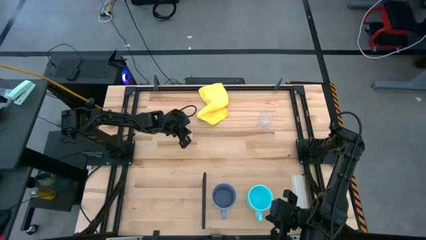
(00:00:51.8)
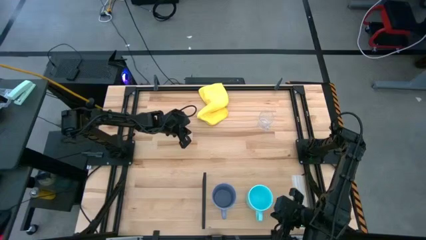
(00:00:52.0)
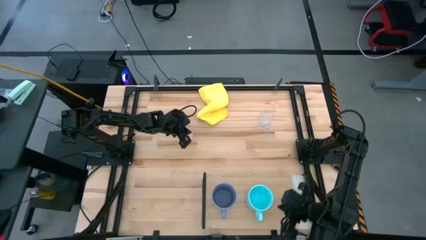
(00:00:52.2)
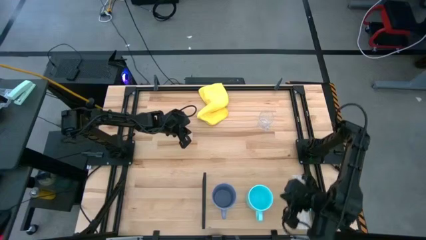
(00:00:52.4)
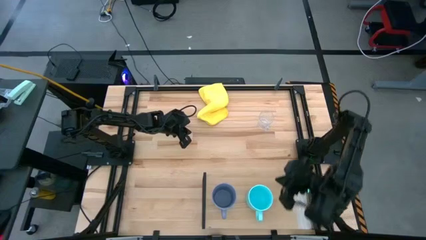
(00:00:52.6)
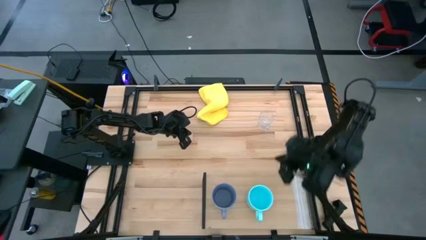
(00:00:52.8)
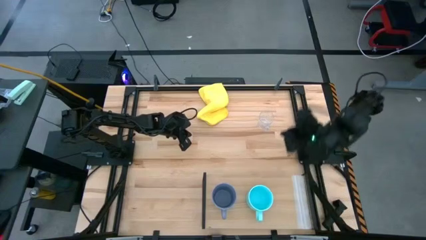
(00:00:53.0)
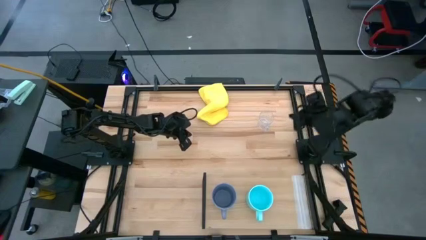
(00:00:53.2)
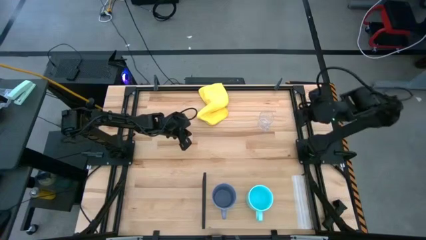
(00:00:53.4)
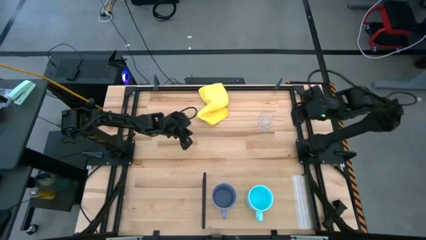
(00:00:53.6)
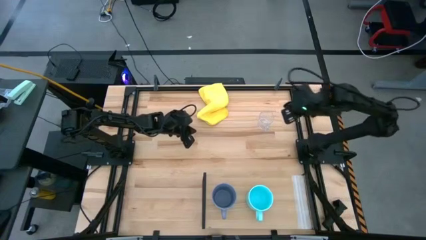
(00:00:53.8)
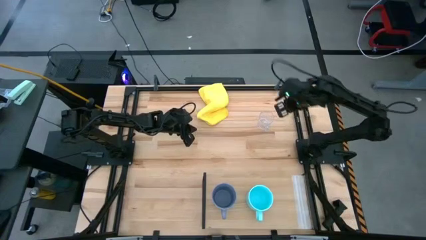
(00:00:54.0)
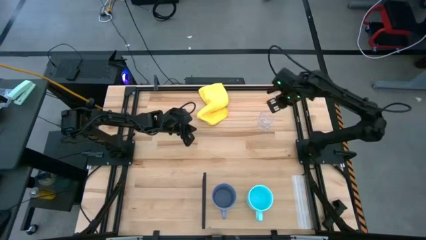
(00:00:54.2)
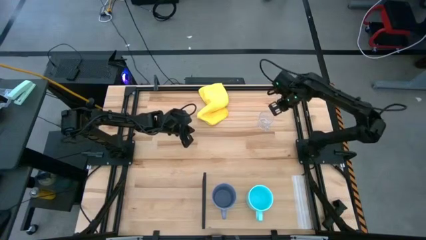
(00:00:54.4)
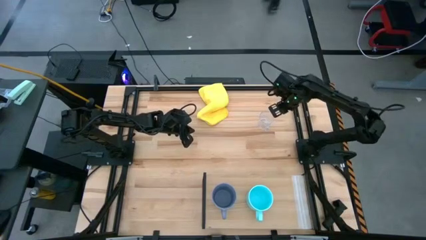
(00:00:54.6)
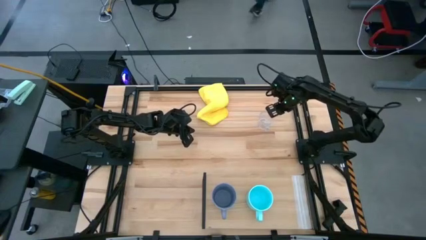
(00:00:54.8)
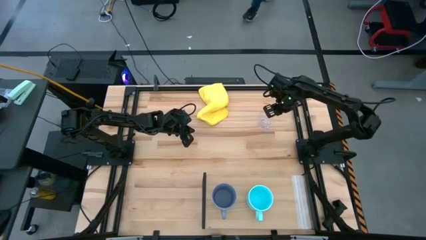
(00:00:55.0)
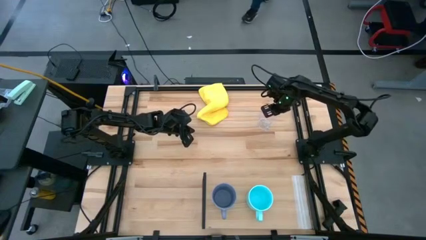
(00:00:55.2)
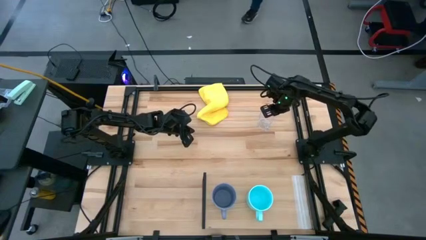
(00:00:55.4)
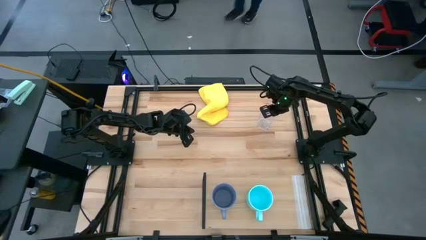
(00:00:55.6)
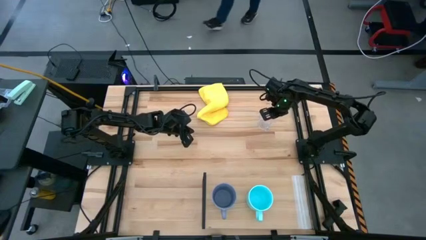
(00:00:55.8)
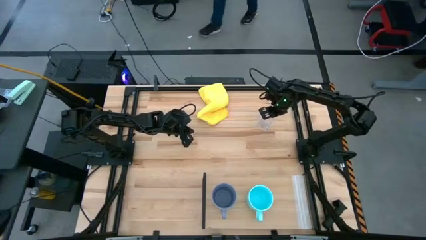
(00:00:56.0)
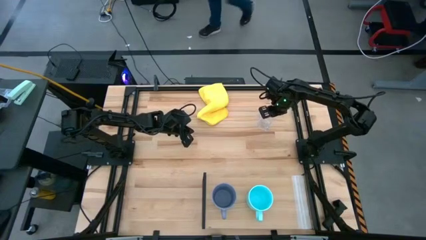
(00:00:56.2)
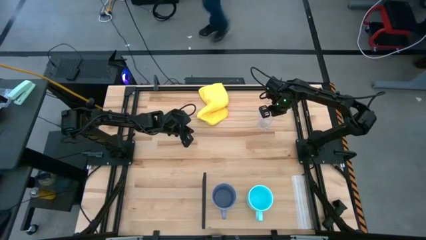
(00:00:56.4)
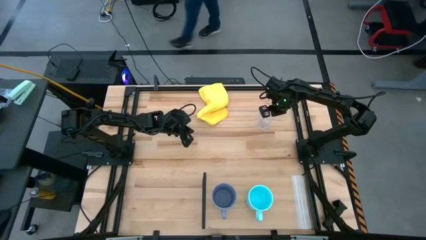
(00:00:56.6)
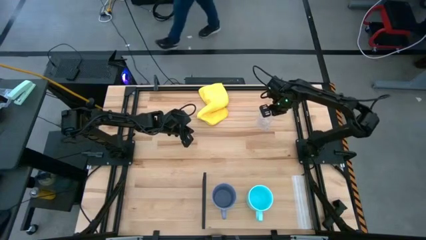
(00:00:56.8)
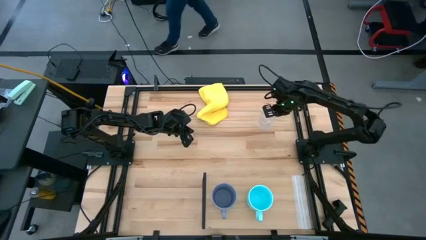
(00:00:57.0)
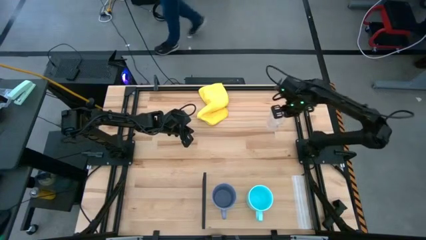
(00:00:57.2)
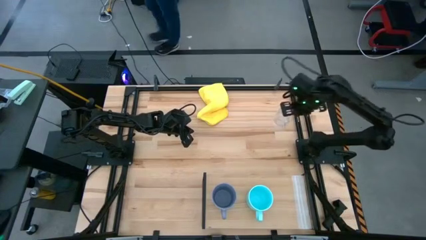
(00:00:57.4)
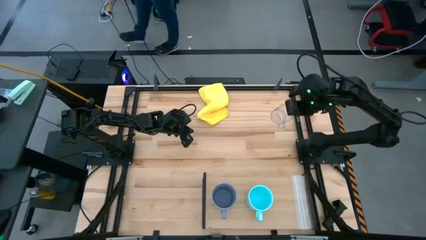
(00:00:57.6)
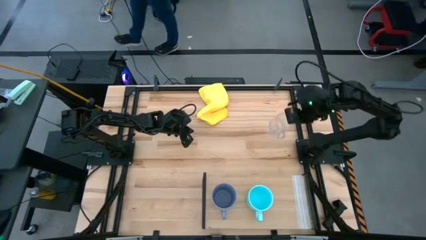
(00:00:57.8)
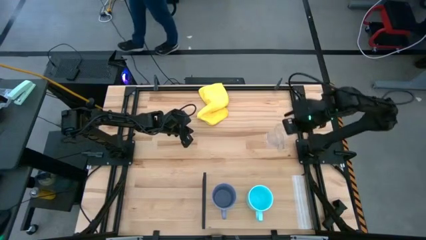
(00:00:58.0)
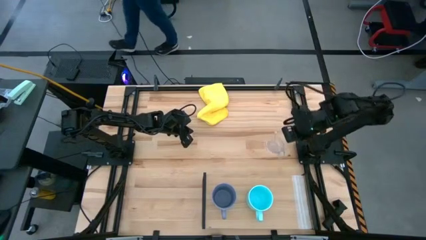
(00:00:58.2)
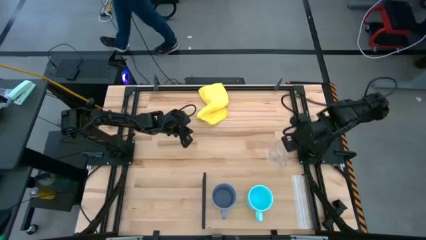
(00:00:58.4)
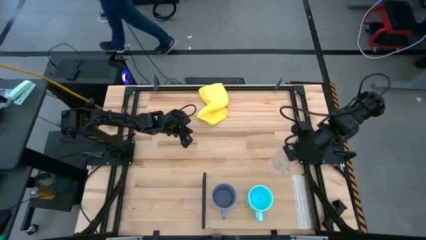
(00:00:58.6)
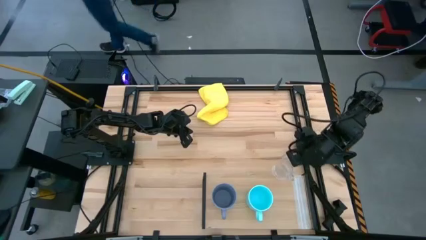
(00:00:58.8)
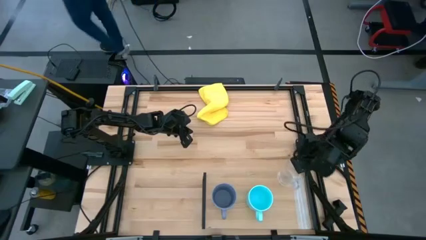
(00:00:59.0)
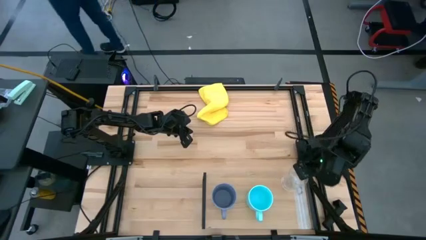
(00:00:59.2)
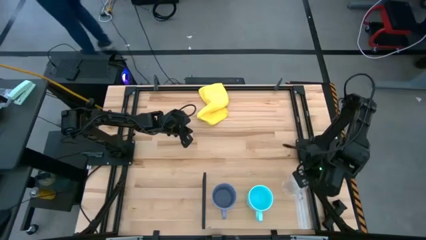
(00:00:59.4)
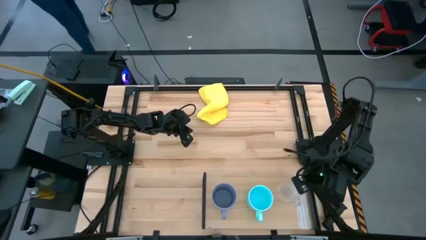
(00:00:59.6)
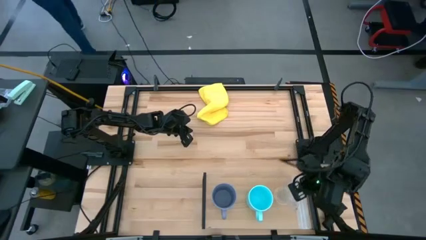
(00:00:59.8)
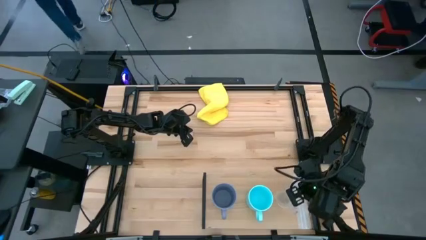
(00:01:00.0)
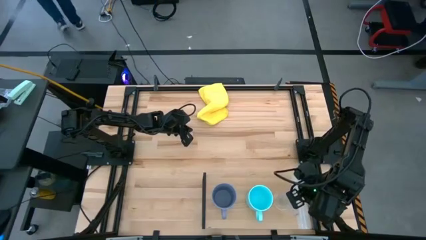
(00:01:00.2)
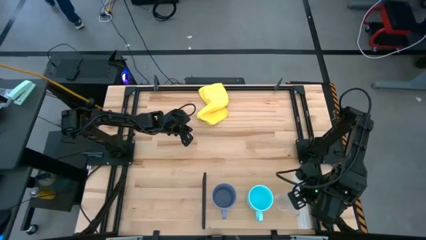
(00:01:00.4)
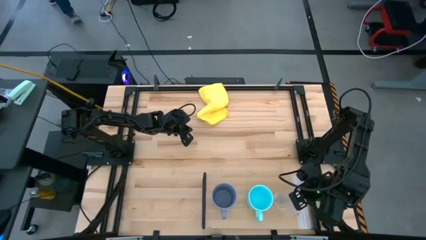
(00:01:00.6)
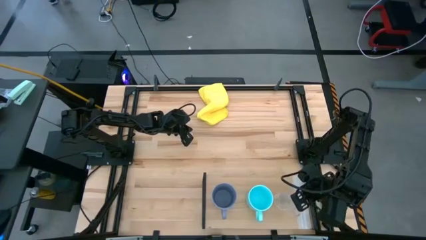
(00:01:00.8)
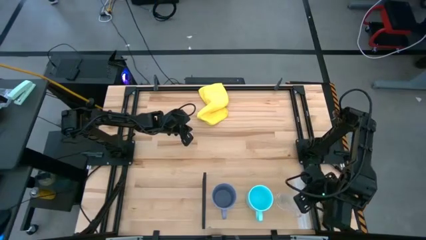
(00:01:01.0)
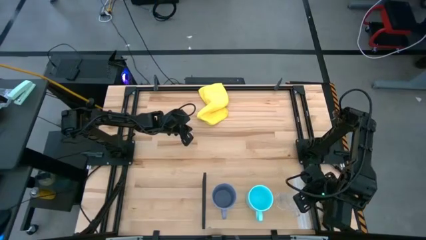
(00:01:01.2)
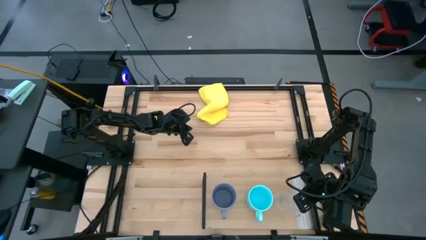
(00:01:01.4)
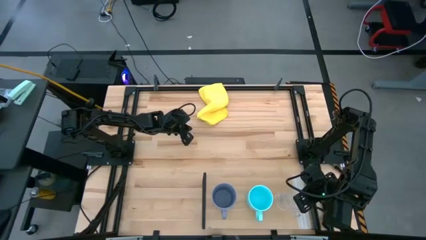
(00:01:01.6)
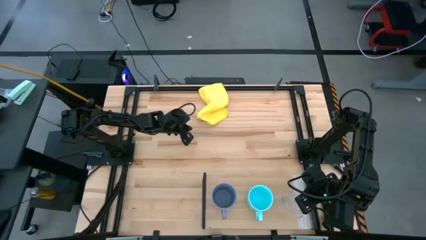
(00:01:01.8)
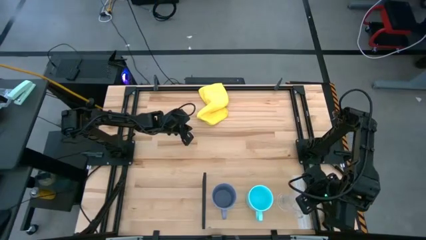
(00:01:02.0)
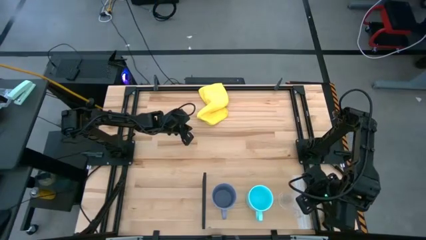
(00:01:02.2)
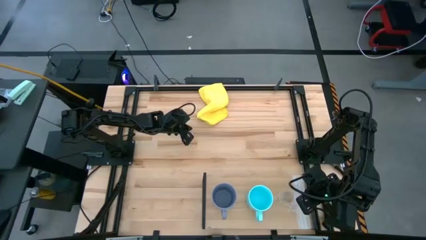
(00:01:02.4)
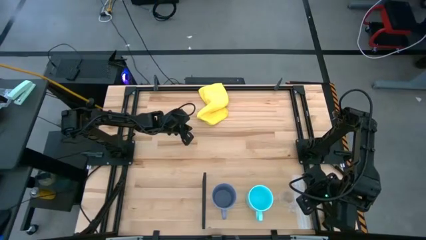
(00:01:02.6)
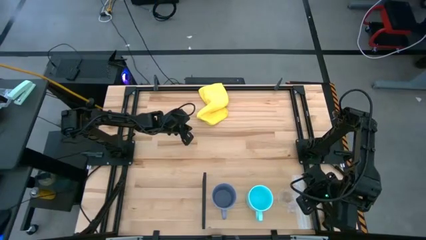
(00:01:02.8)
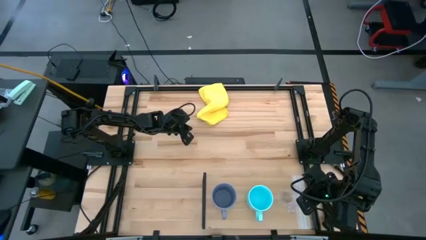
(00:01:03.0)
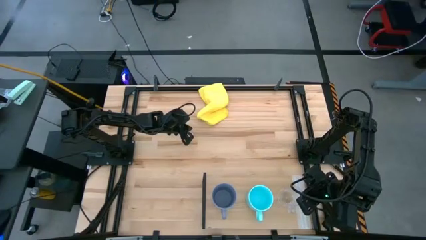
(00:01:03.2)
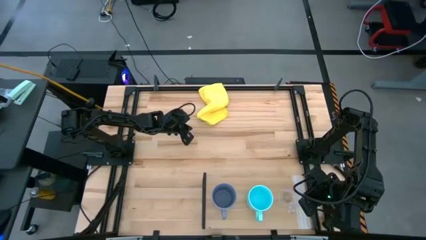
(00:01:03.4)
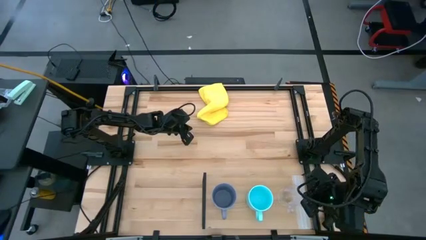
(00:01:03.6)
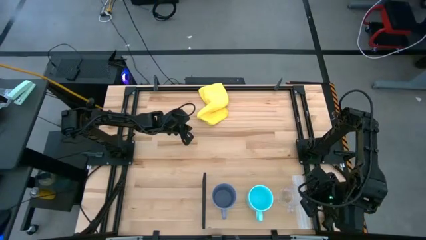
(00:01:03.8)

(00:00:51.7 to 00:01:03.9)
Task: Stack small to large cups/mugs on shelf
Put the transparent mug on the shelf

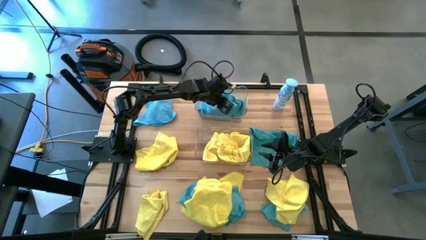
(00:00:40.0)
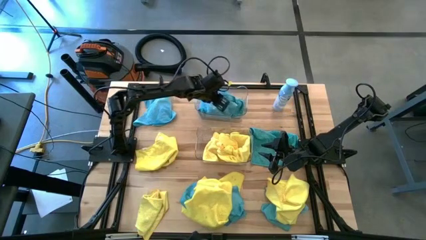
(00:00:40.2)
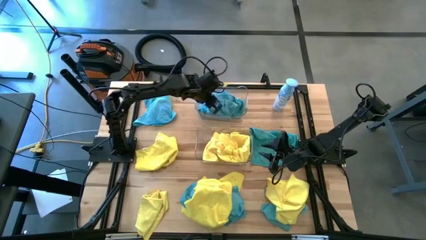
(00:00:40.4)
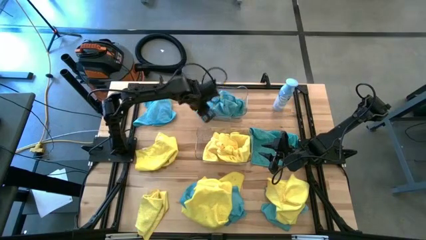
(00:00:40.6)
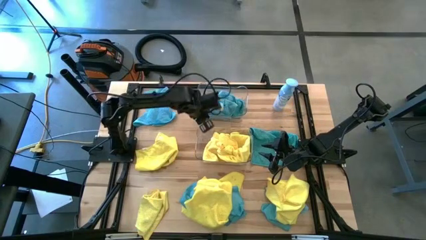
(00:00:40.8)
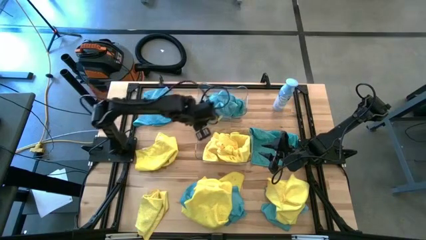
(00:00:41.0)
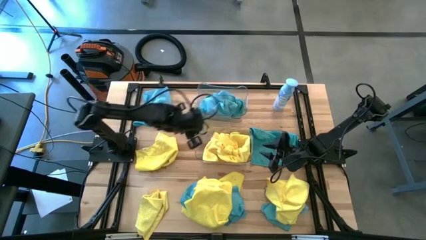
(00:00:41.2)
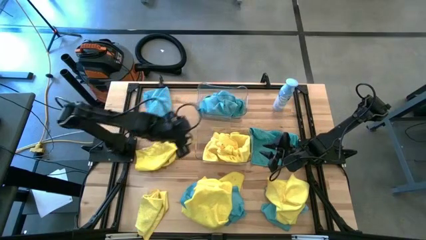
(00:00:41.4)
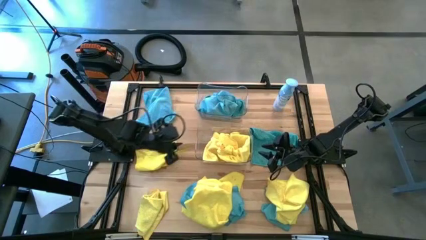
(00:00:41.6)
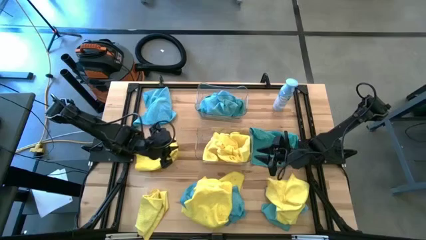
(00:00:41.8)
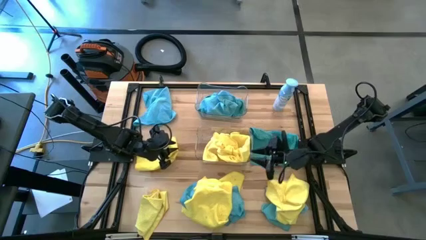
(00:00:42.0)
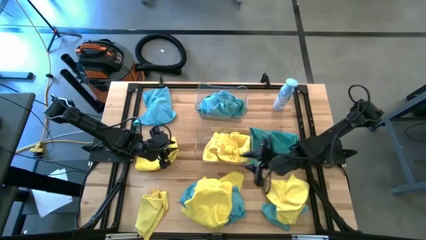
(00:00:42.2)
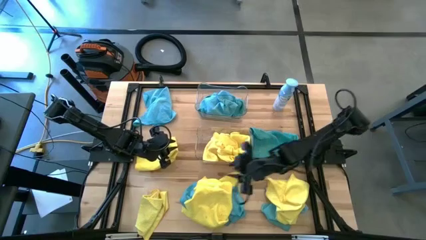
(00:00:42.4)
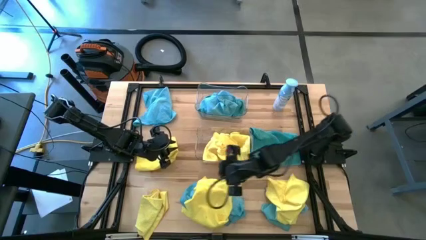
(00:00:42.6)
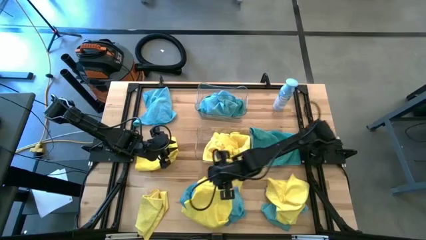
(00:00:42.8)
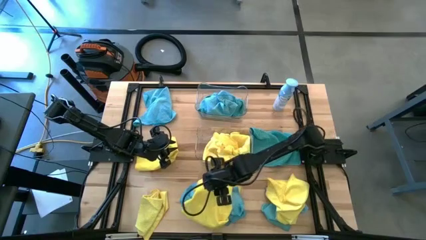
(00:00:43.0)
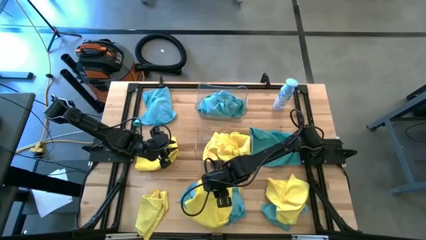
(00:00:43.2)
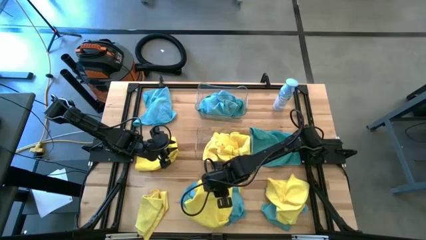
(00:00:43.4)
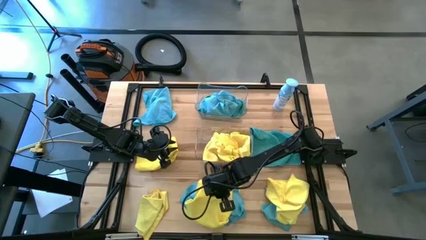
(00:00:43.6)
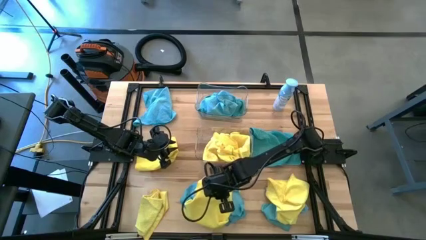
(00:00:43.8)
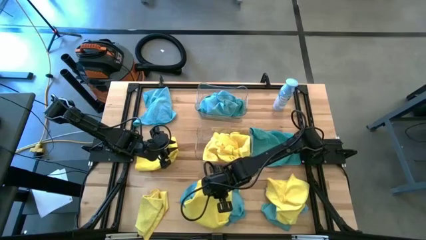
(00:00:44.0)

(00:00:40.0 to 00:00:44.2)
Task: Sort microfiber towel by color & place in baskets
Put the yellow towel into the bottom transparent bin
